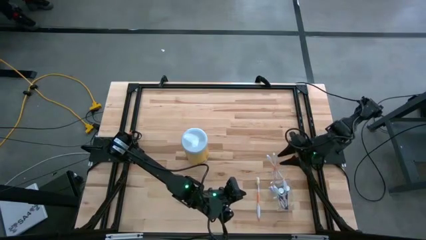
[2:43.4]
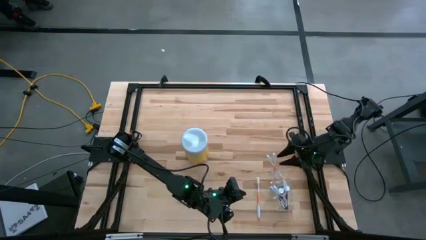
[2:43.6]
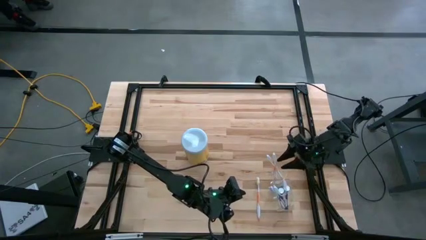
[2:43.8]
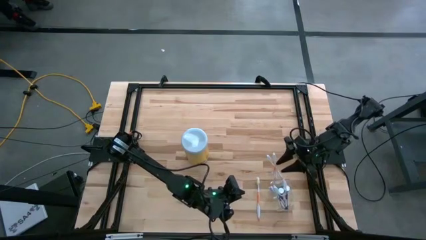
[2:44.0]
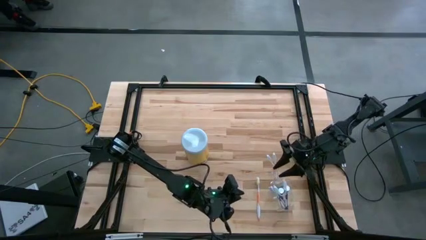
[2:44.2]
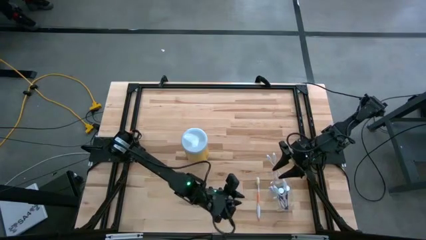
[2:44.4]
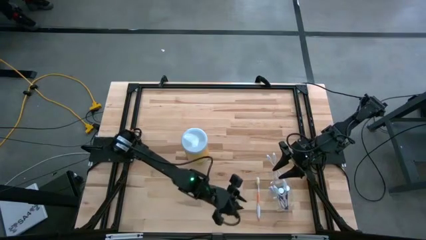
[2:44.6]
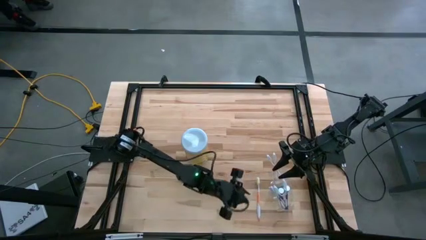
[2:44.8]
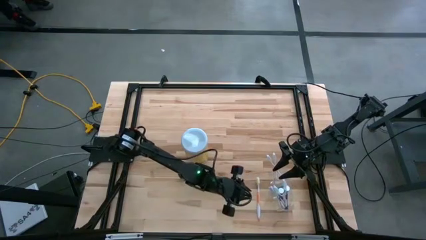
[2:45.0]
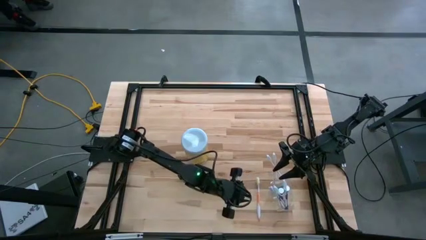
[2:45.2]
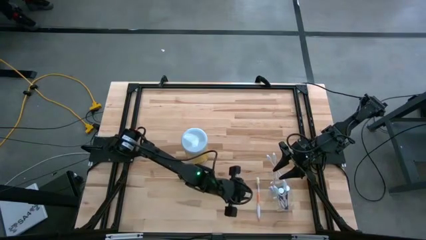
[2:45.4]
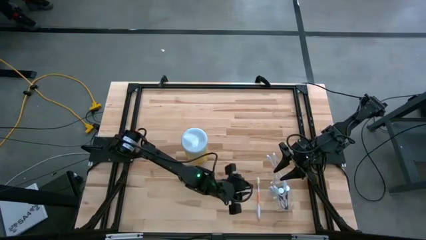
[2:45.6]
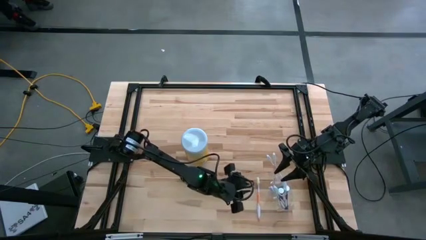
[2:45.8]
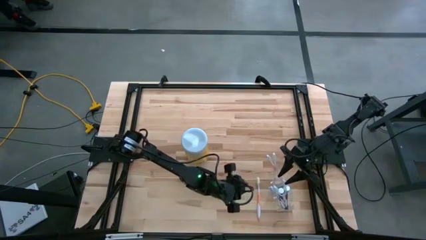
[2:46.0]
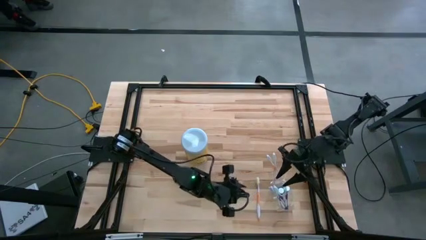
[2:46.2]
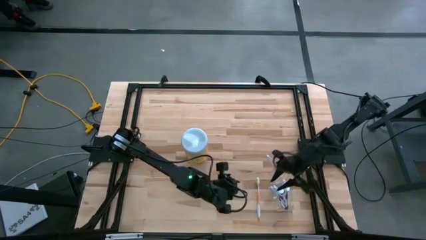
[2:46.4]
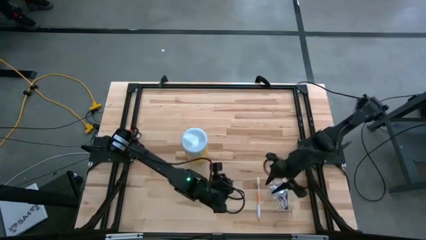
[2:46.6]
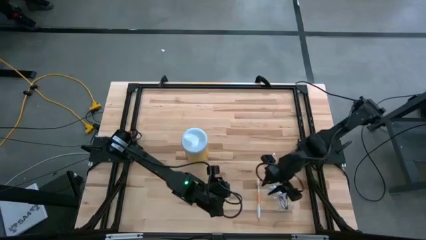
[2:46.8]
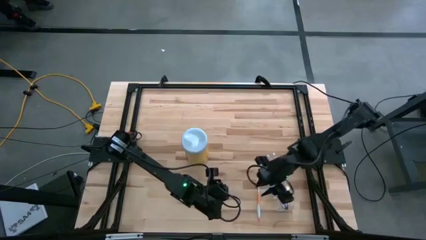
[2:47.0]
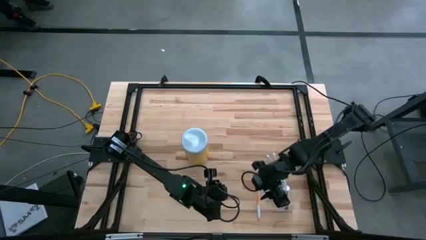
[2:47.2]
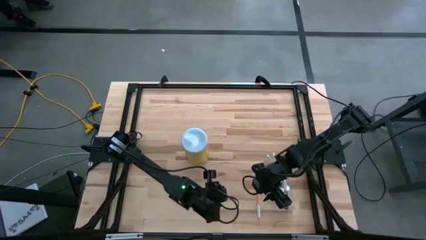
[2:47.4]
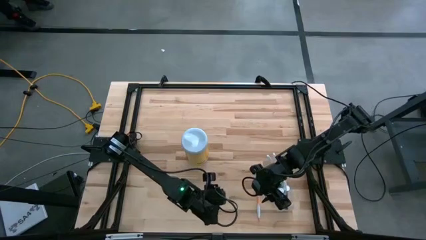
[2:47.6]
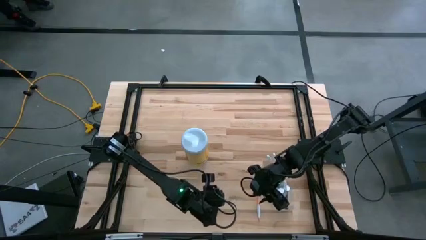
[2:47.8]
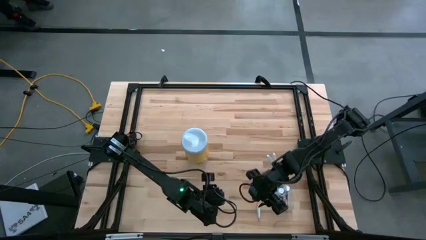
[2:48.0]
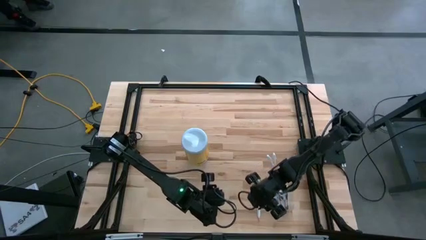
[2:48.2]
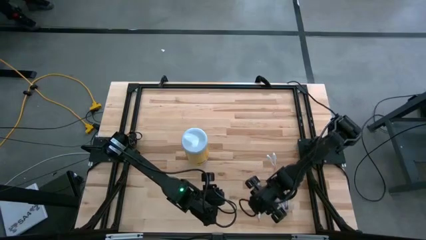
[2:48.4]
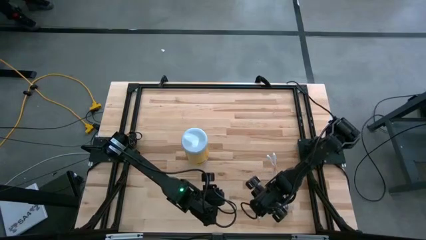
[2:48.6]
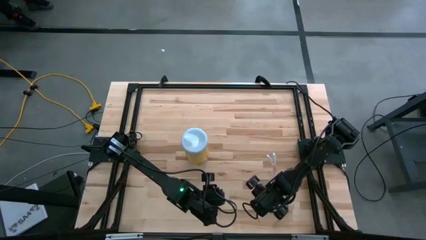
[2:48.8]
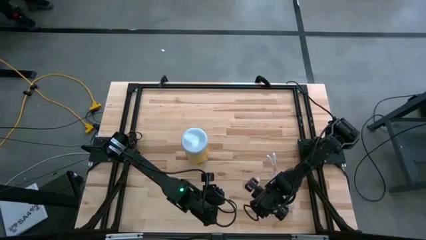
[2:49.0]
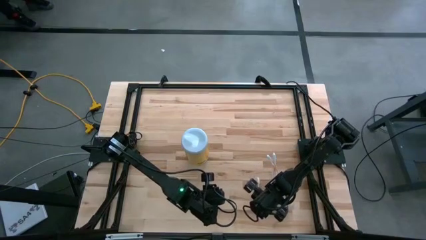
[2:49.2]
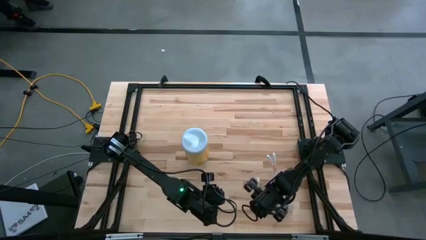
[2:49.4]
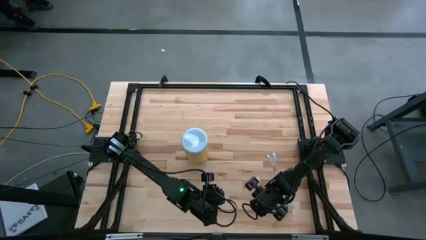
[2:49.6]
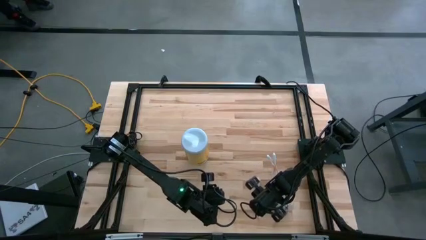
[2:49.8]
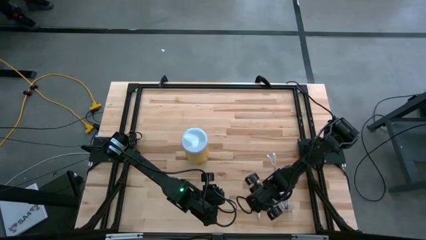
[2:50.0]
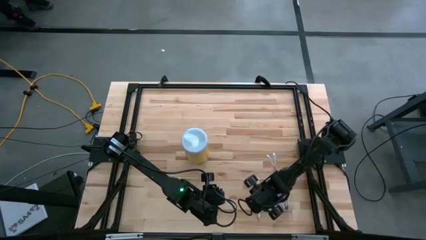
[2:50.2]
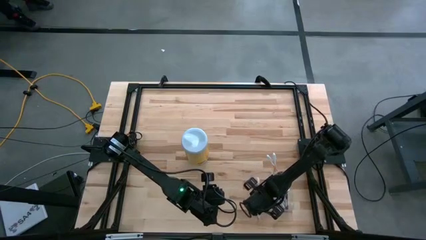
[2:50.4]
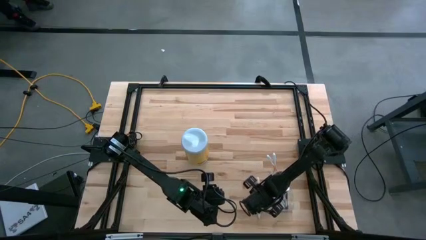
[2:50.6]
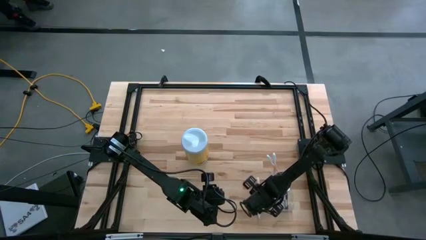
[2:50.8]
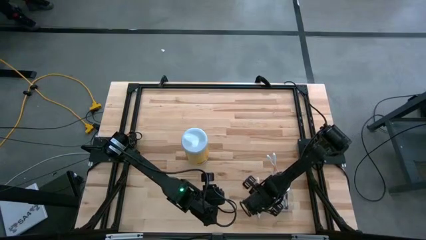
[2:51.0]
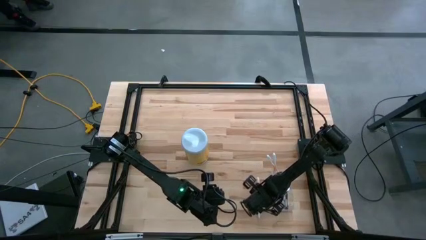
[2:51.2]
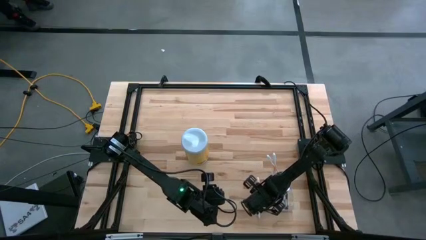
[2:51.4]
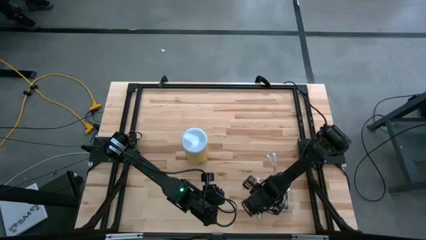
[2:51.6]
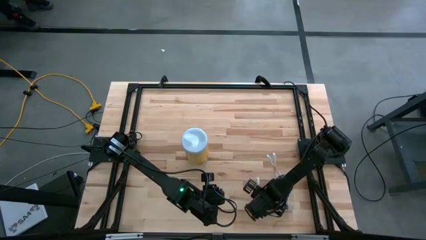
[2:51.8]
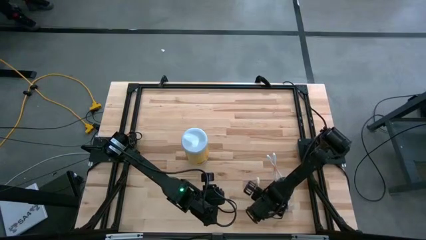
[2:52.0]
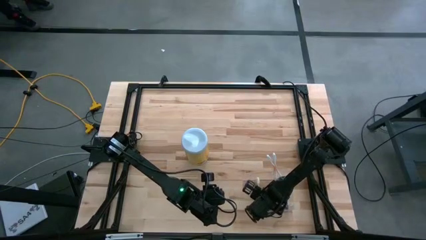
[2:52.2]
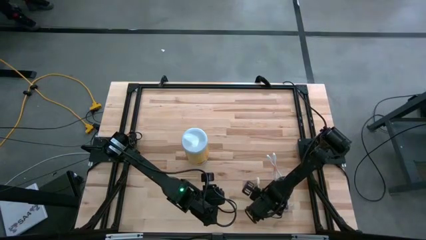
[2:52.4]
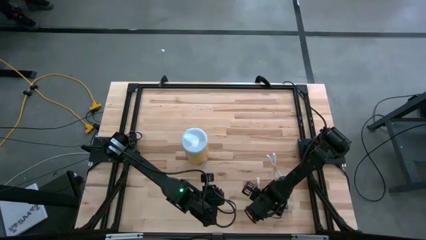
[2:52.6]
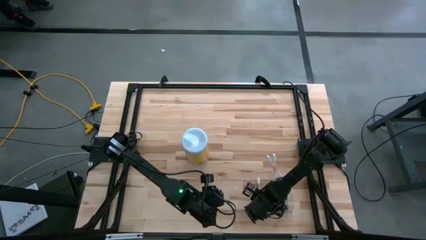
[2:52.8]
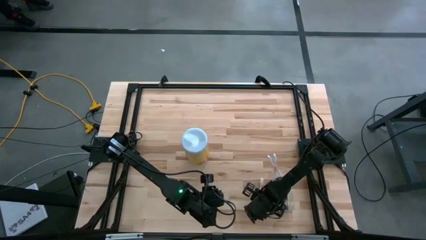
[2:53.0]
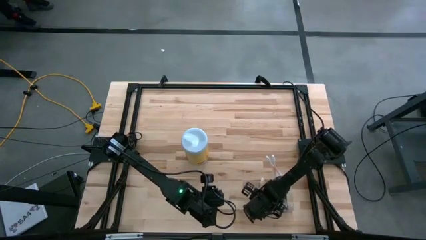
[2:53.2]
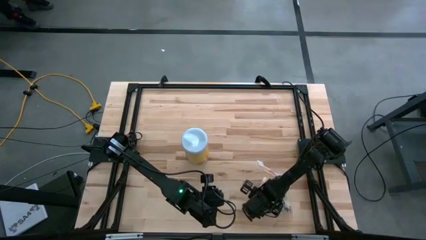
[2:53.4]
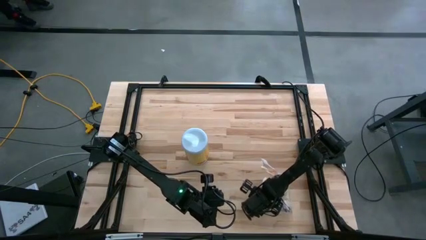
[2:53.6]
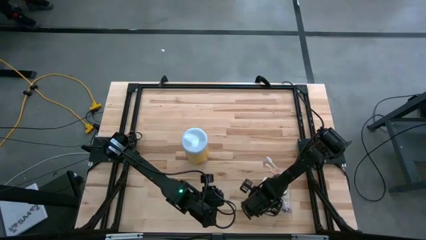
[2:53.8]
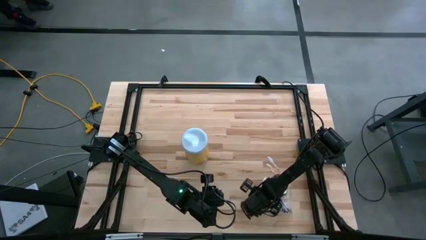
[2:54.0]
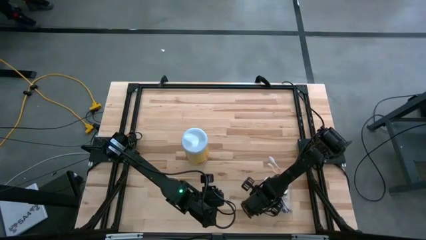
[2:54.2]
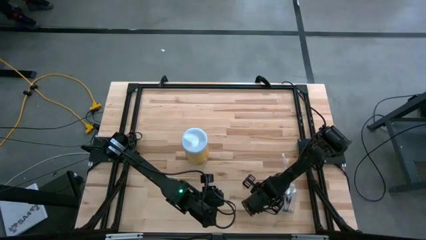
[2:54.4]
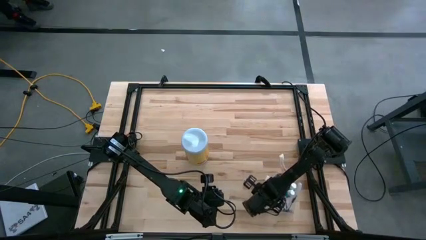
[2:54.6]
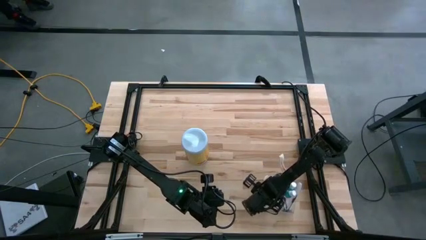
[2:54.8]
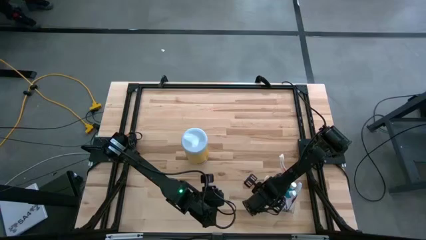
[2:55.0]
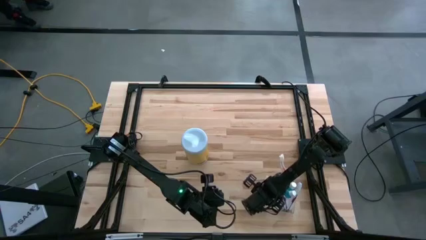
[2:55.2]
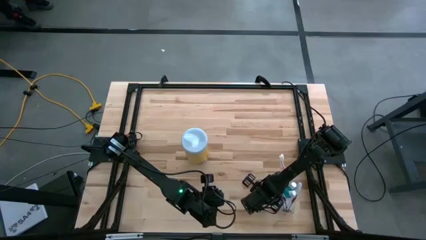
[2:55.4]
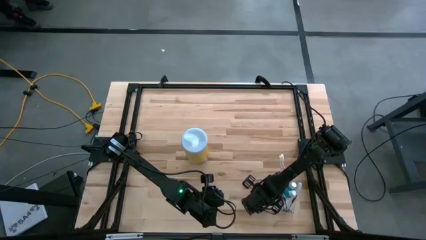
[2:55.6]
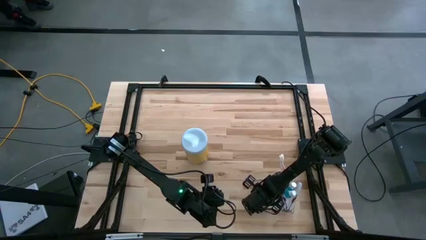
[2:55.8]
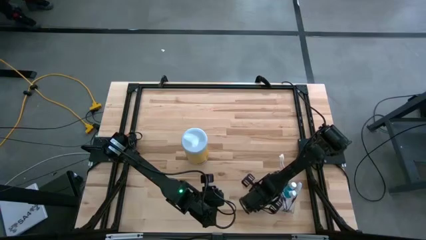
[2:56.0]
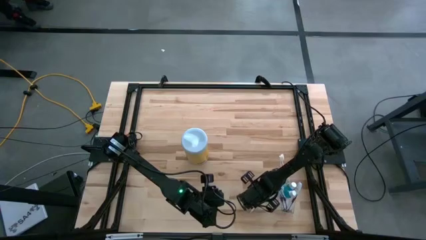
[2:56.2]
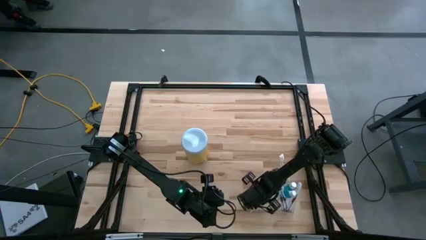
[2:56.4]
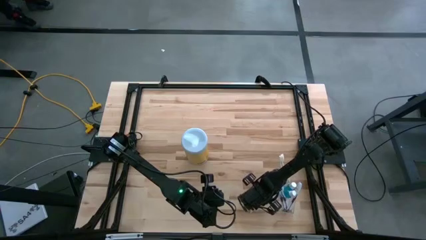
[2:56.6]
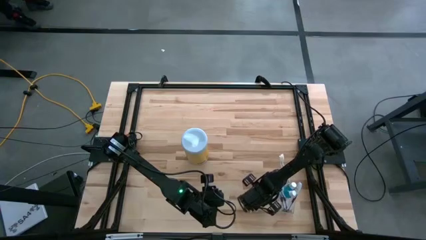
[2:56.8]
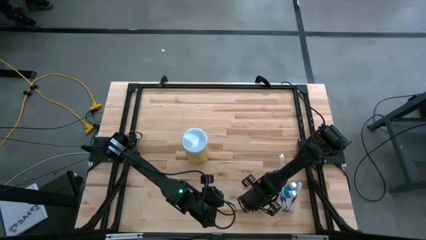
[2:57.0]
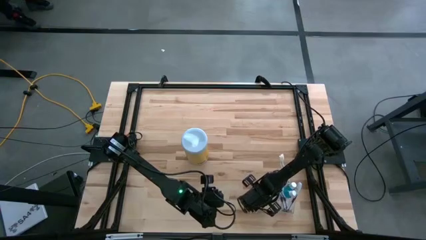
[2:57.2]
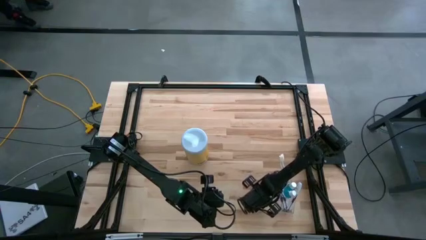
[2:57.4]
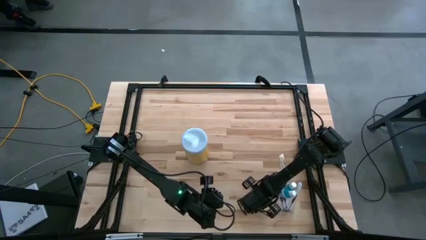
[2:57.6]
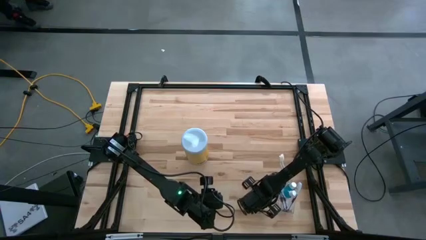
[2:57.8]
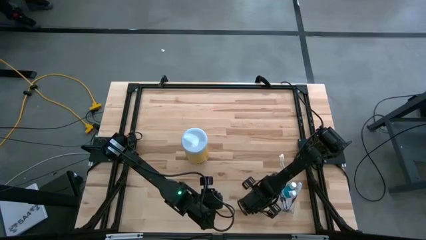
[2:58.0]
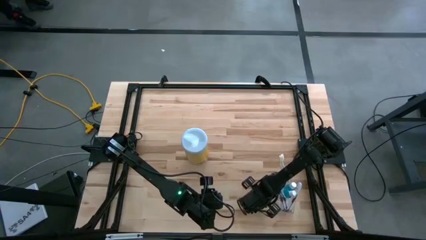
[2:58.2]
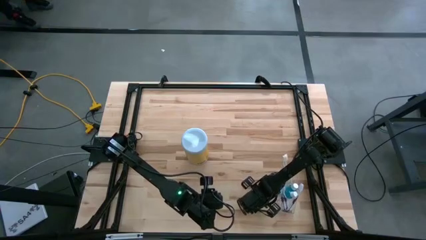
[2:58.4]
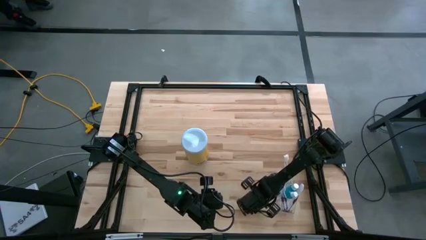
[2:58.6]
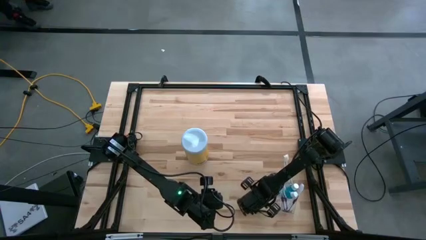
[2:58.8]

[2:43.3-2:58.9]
Task: Pick & Place toothbrushing station
Put the orange toothbrush in the top section of the transparent organizer
